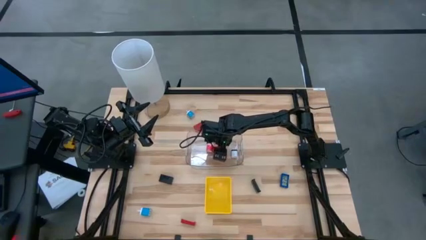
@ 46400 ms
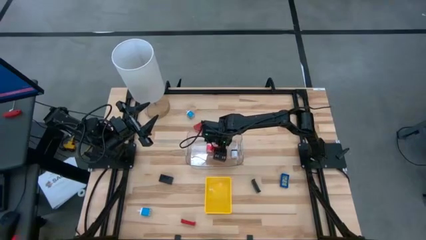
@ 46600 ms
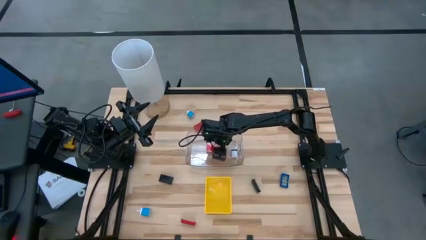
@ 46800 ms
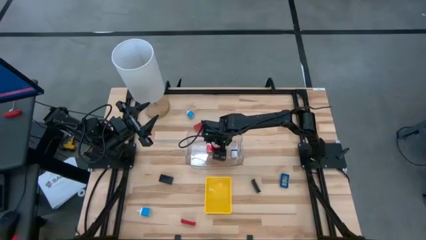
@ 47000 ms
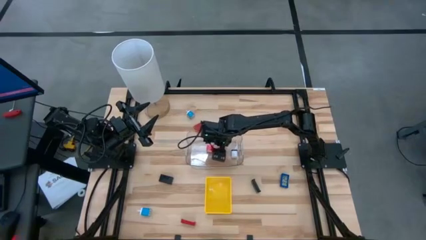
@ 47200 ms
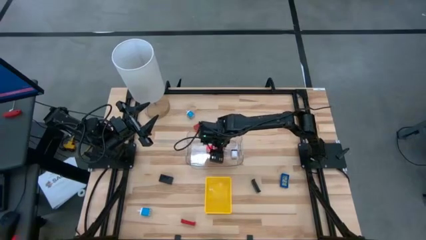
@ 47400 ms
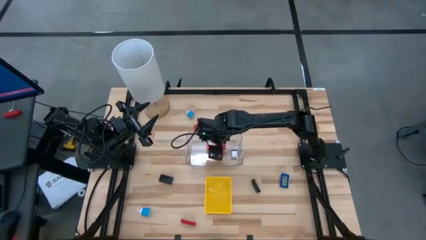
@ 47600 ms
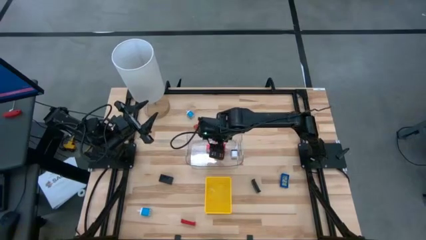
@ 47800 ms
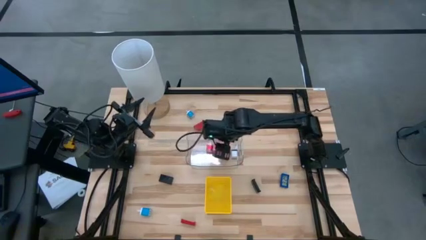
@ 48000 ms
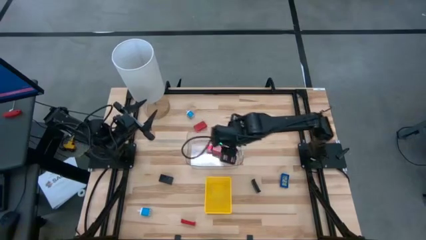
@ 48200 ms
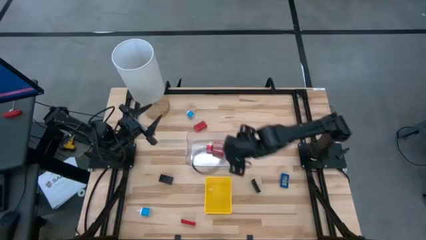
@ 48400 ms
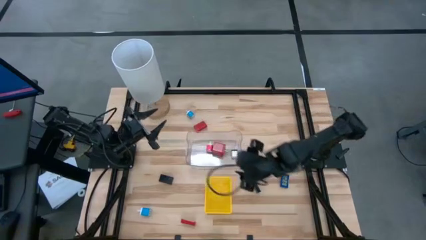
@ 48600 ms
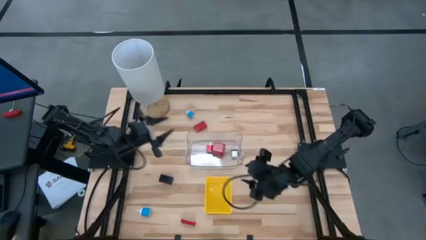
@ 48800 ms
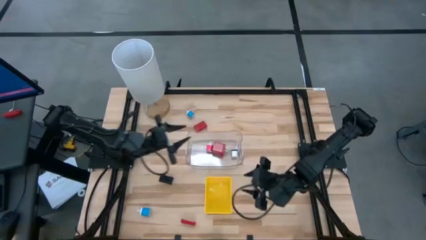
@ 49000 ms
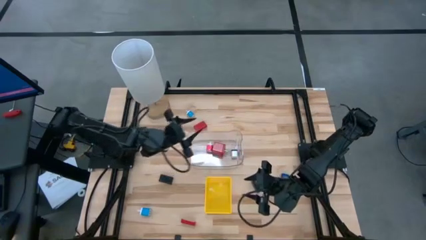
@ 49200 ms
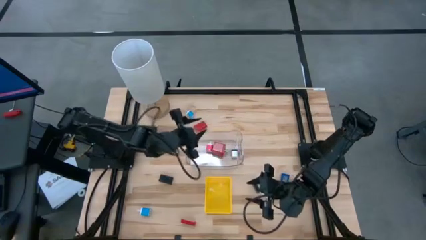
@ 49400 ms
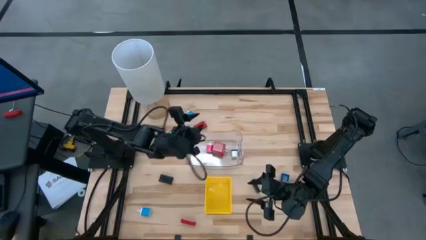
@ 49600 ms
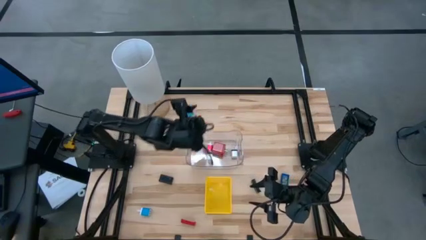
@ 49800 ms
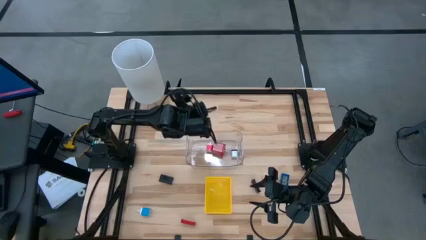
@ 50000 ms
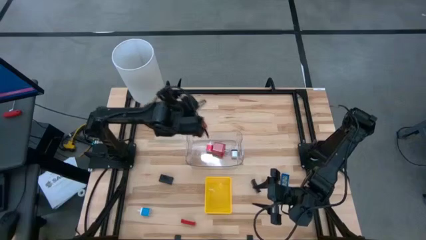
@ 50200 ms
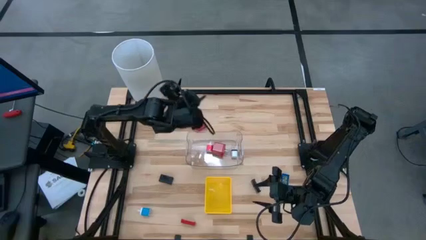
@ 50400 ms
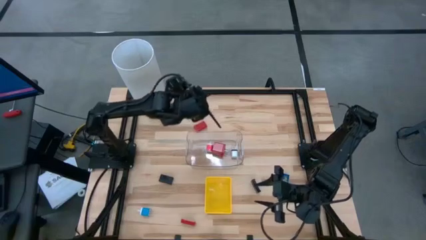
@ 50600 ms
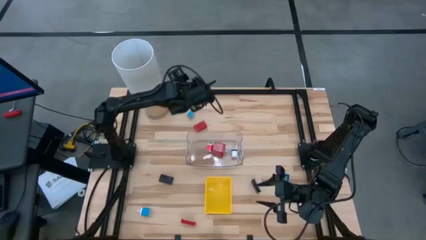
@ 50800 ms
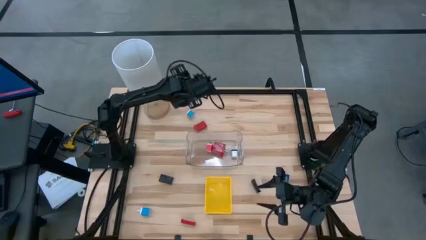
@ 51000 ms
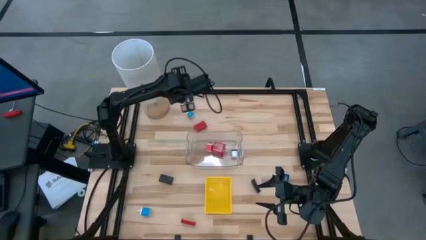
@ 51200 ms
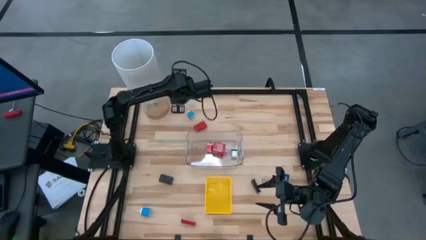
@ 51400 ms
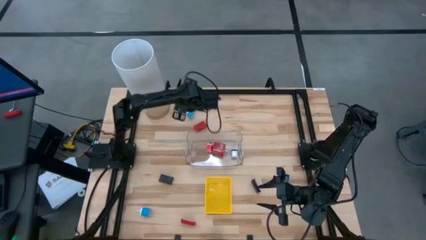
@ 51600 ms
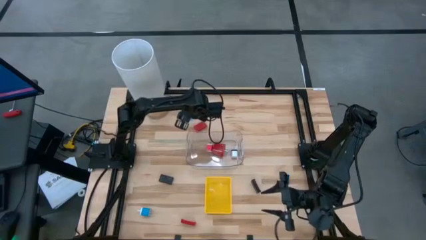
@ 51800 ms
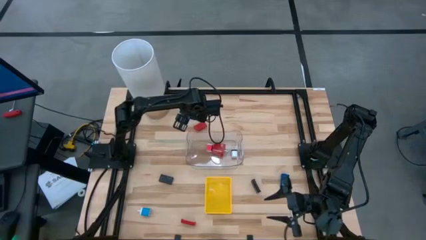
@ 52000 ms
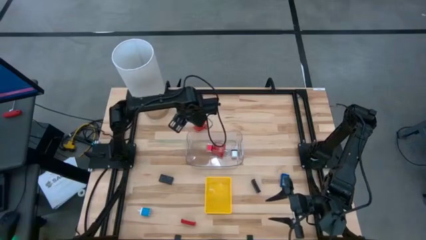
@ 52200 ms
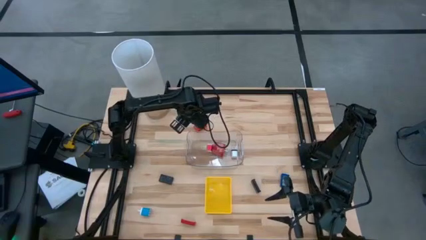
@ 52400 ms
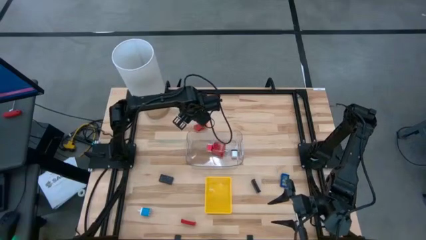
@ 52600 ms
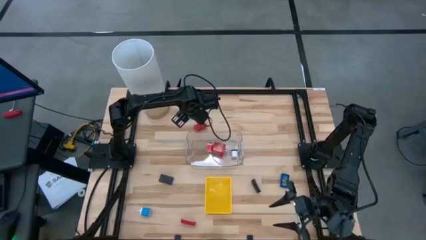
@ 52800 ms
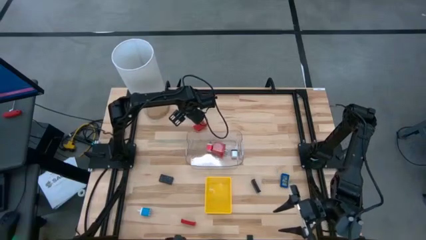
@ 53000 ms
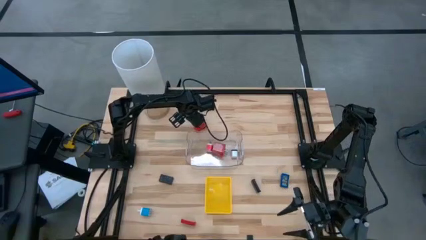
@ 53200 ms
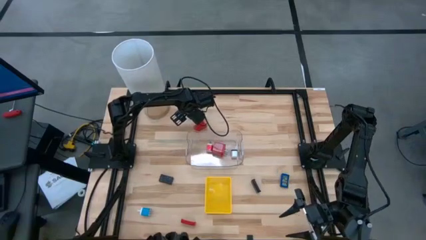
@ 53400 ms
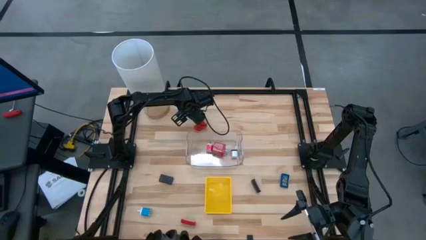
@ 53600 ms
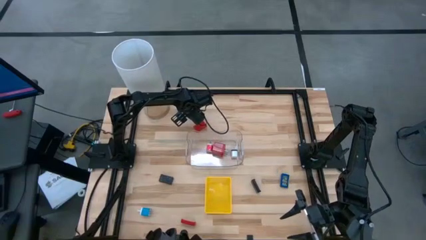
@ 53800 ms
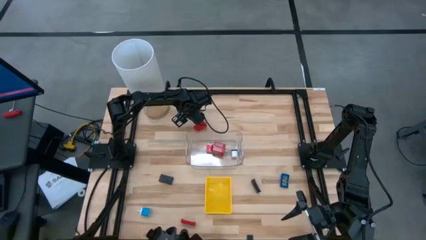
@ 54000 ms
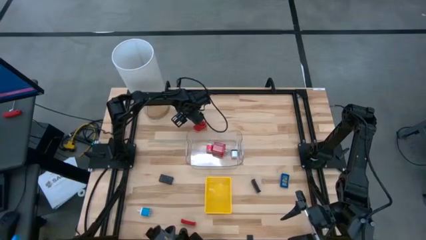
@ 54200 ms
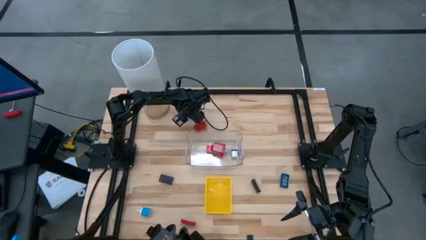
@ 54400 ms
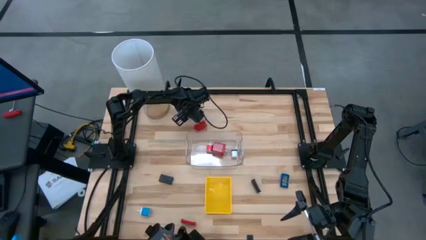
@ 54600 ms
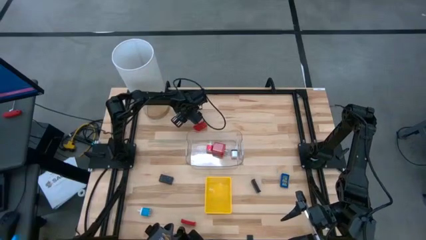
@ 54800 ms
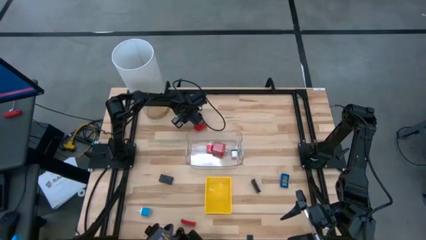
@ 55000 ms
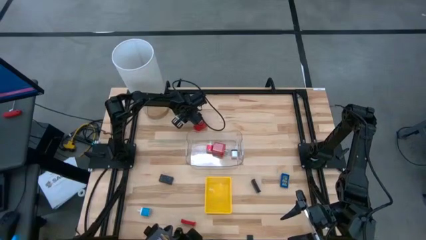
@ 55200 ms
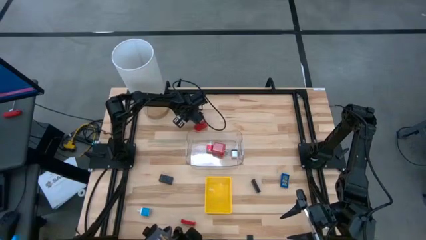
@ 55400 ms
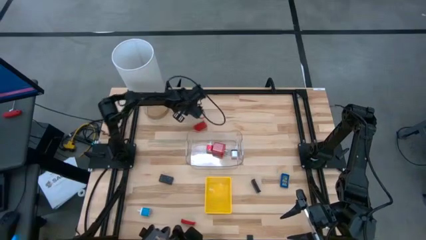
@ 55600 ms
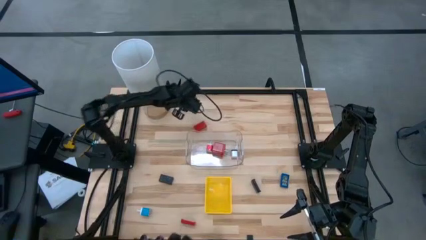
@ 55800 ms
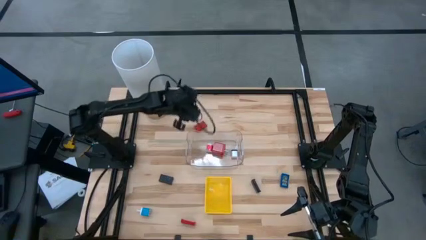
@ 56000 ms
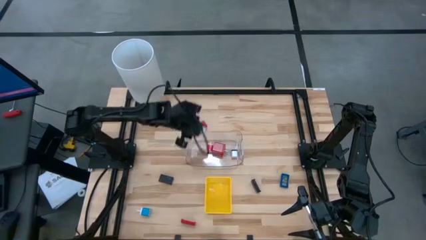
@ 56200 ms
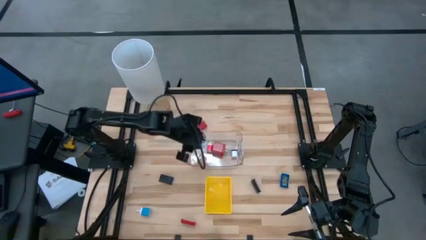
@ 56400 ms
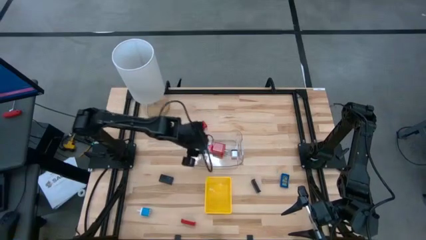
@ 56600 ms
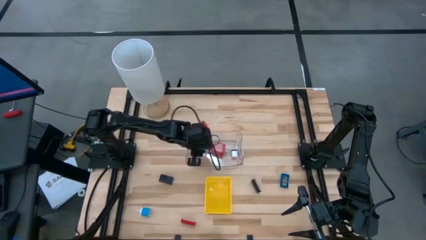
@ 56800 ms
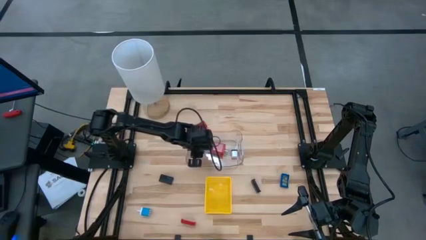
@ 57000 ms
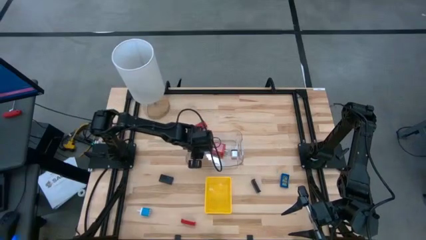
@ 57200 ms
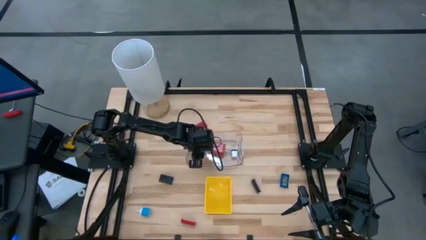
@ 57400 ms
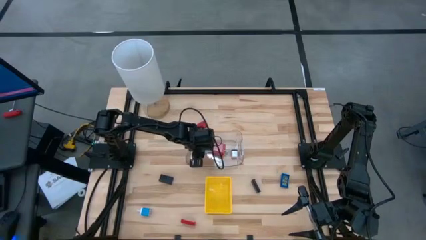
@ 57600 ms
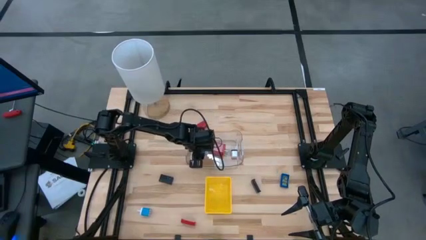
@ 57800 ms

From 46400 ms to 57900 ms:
Task: Pick & Place Office items
Put the top blue charger adapter into the transparent bin

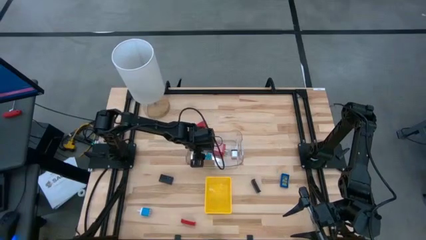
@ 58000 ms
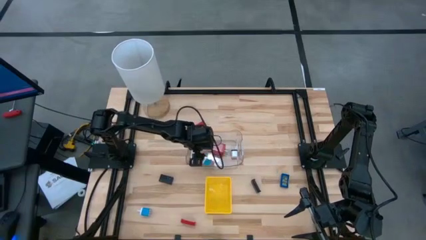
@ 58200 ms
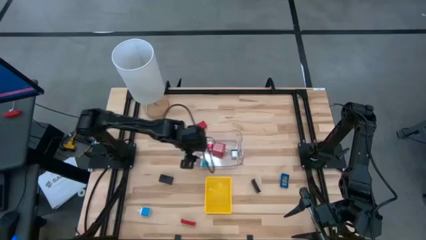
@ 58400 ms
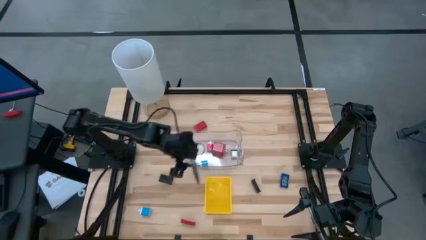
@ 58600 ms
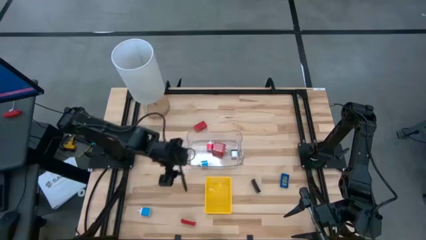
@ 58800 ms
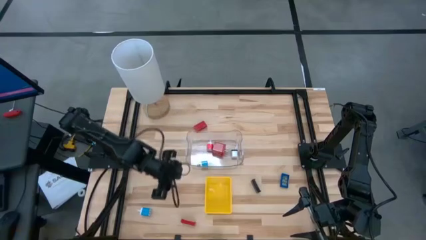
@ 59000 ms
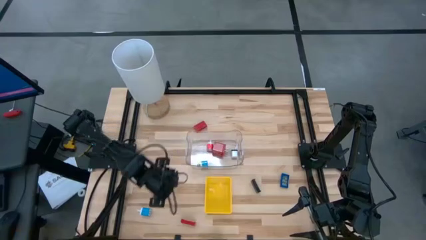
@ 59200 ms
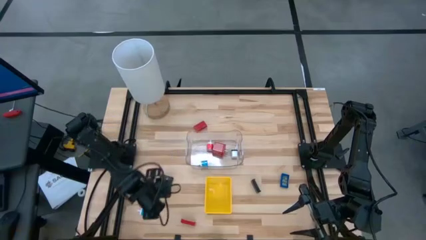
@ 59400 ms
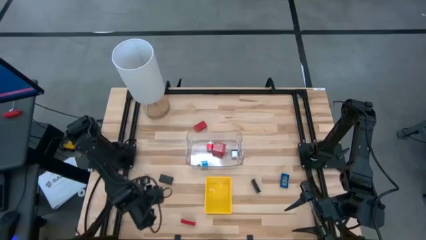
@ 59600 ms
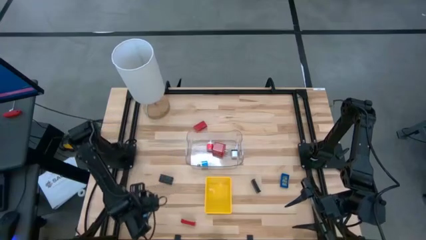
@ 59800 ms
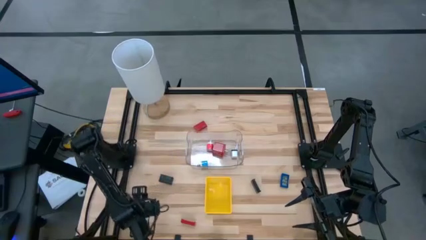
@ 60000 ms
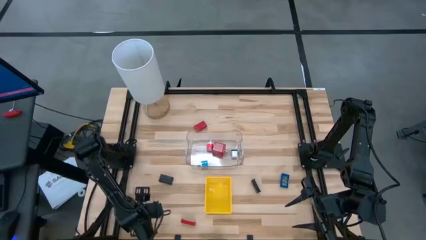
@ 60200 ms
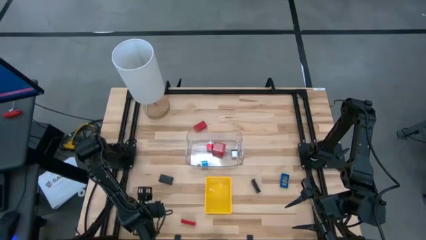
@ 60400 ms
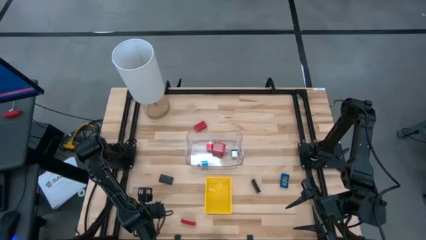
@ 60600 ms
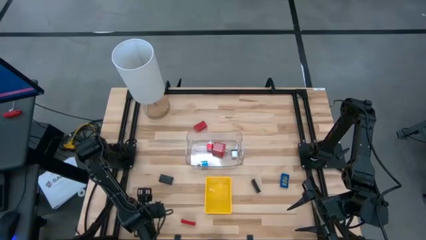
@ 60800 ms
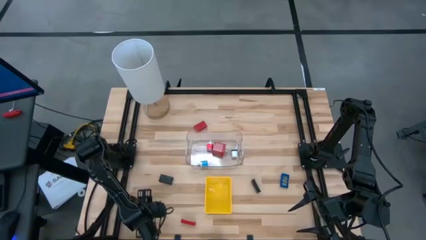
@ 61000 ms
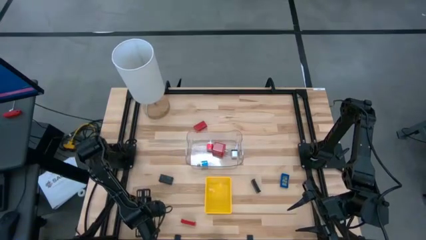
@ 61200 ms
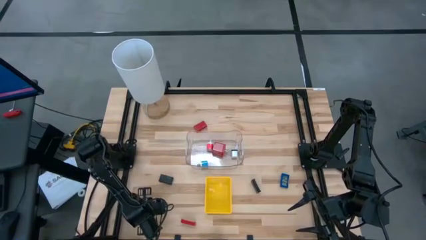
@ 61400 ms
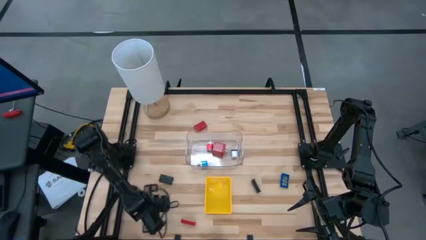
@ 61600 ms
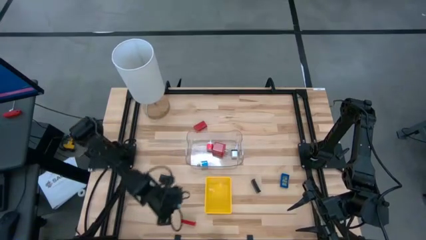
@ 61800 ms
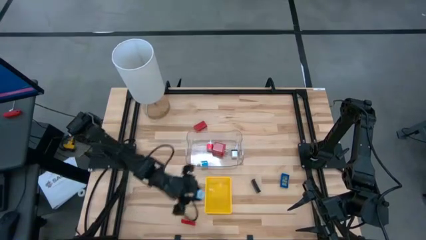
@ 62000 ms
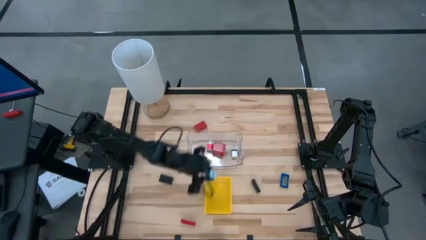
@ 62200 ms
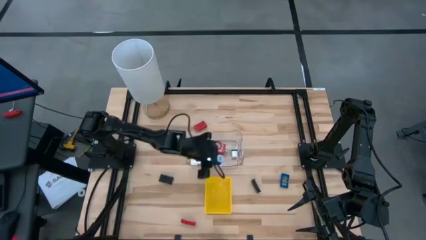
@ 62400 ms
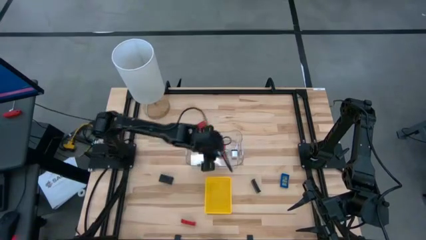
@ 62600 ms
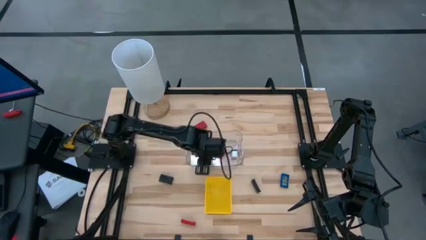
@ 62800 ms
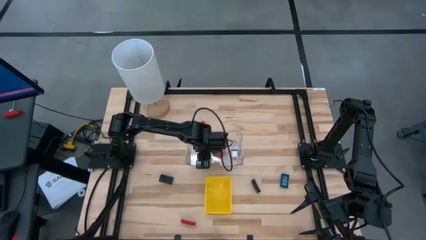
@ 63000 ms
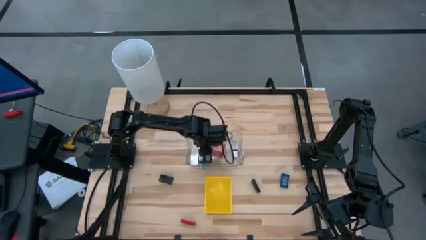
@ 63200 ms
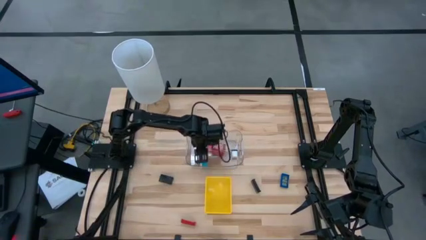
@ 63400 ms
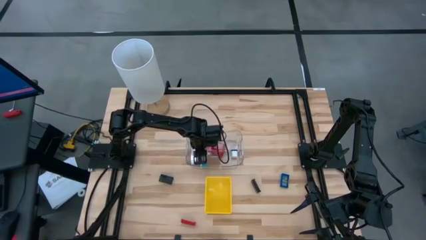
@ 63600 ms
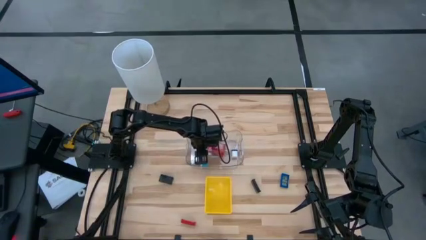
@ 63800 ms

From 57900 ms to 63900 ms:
Put the blue charger adapter into the transparent bin
